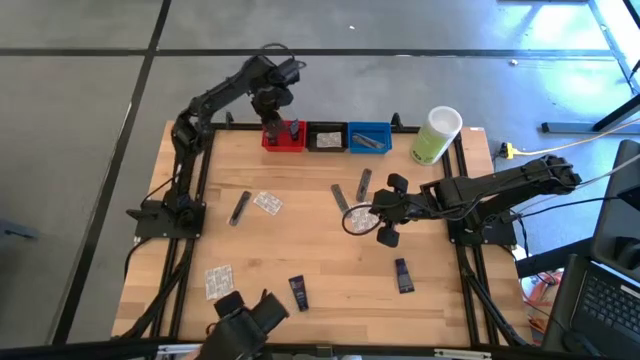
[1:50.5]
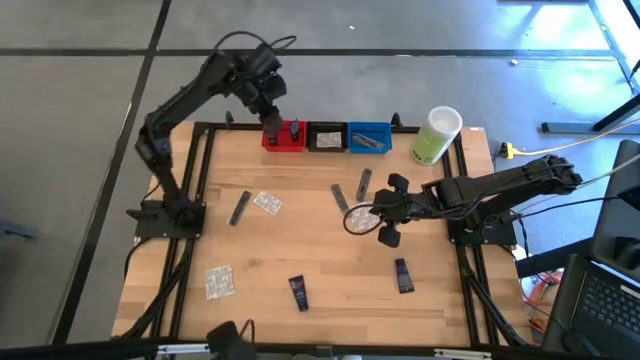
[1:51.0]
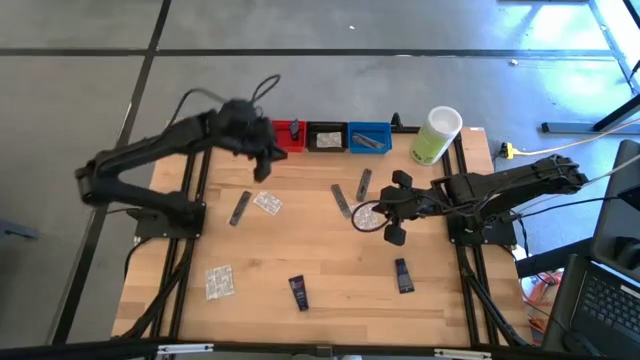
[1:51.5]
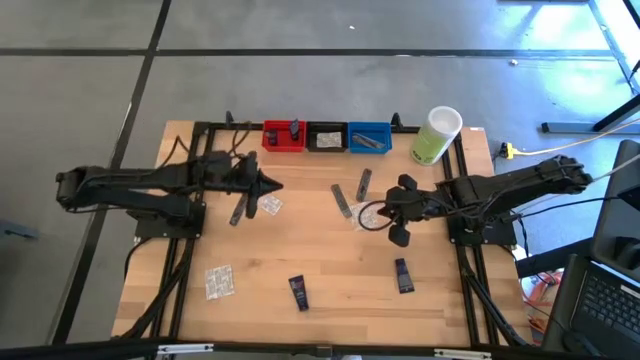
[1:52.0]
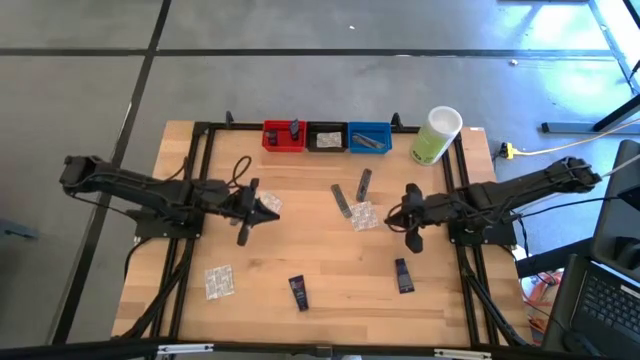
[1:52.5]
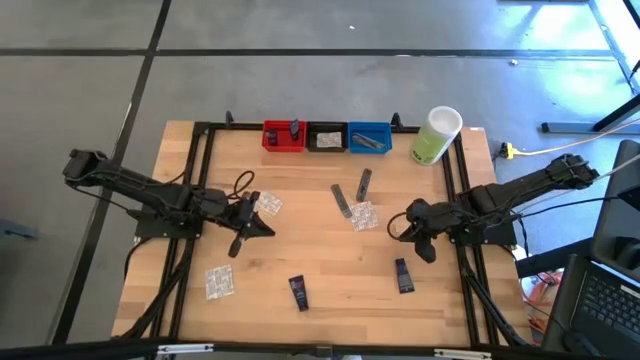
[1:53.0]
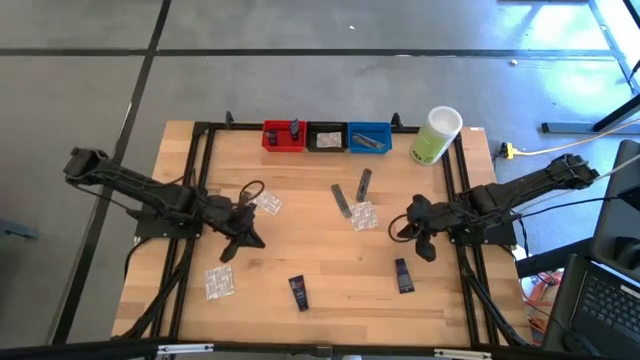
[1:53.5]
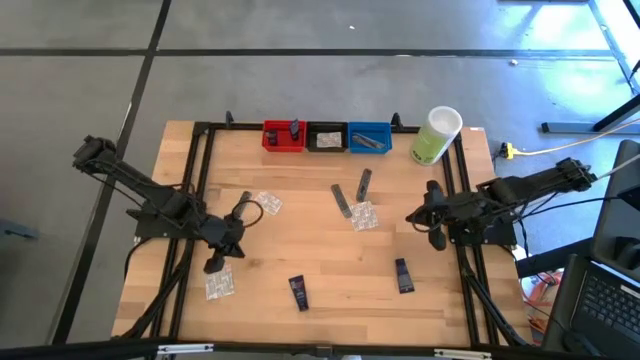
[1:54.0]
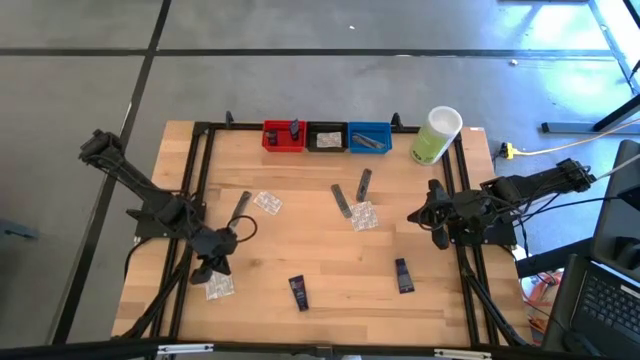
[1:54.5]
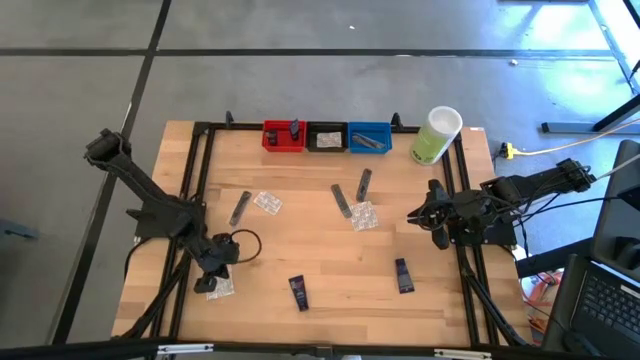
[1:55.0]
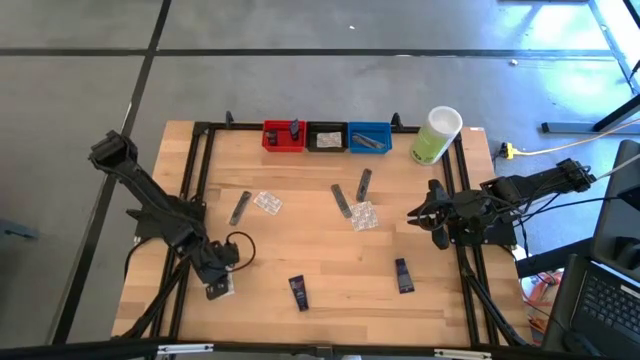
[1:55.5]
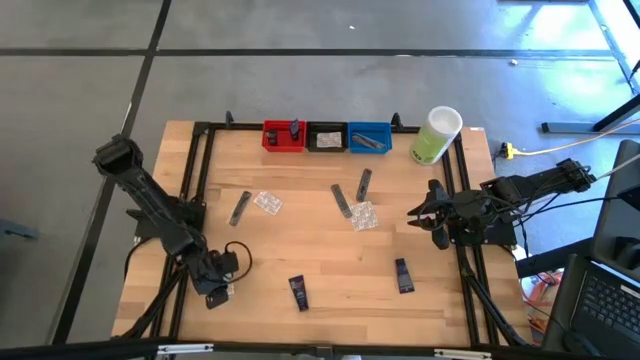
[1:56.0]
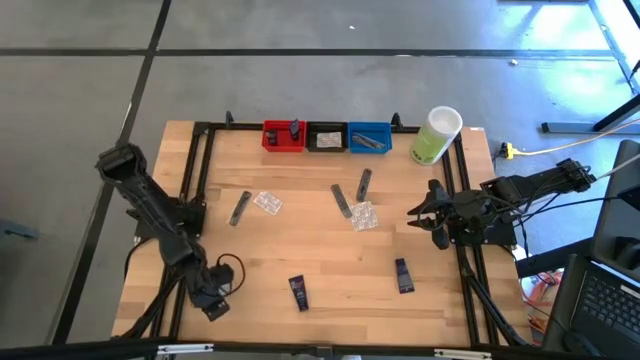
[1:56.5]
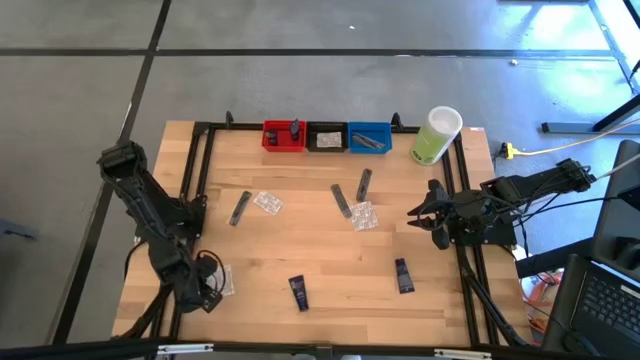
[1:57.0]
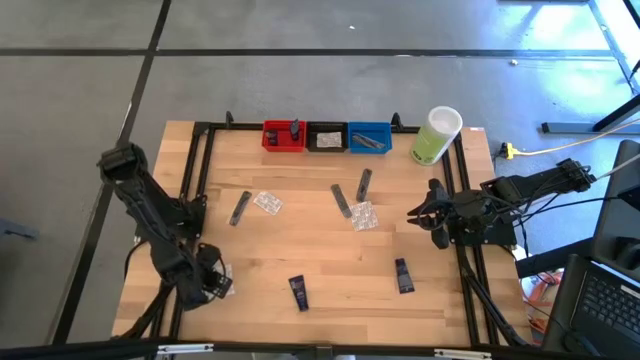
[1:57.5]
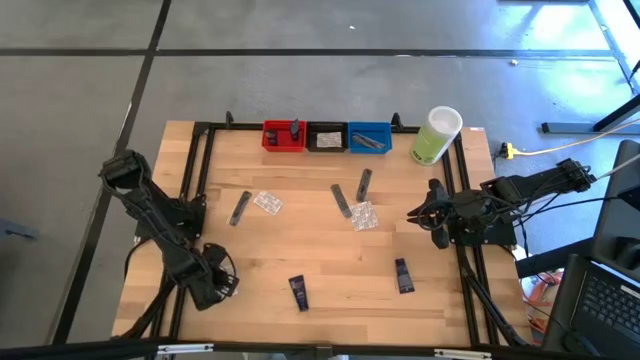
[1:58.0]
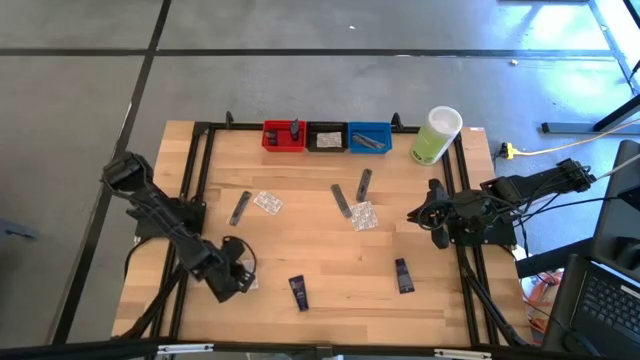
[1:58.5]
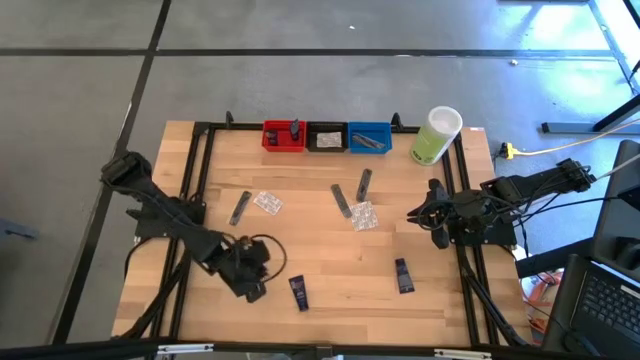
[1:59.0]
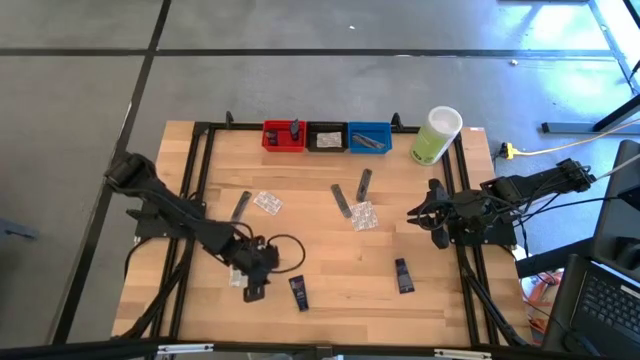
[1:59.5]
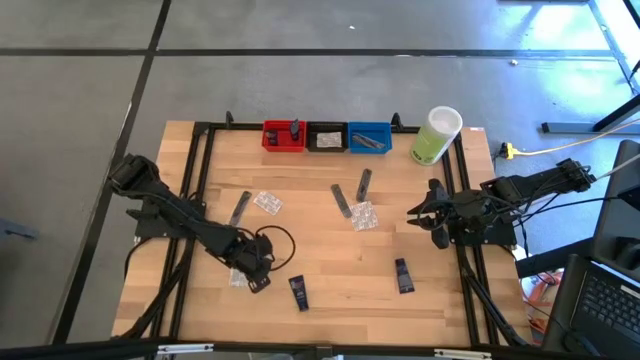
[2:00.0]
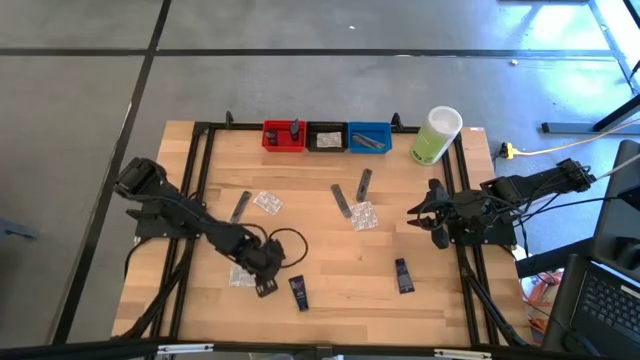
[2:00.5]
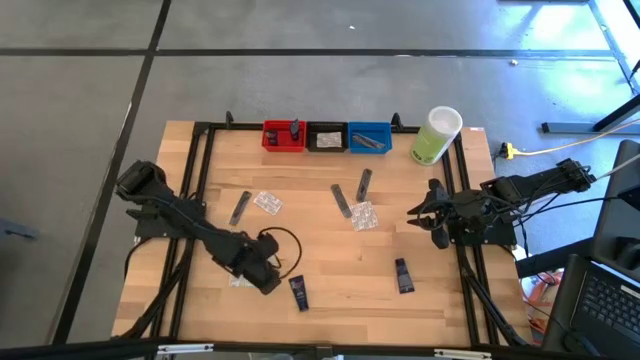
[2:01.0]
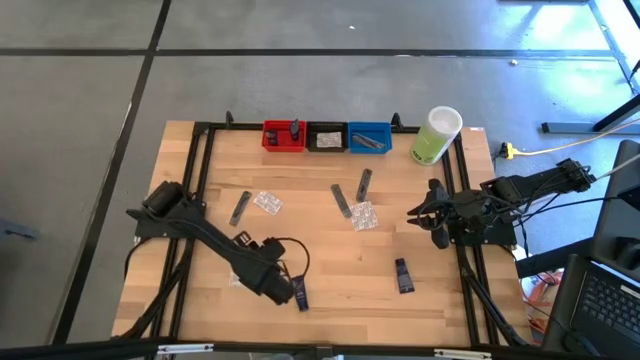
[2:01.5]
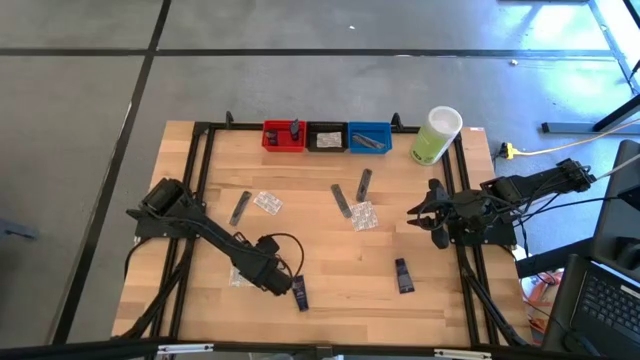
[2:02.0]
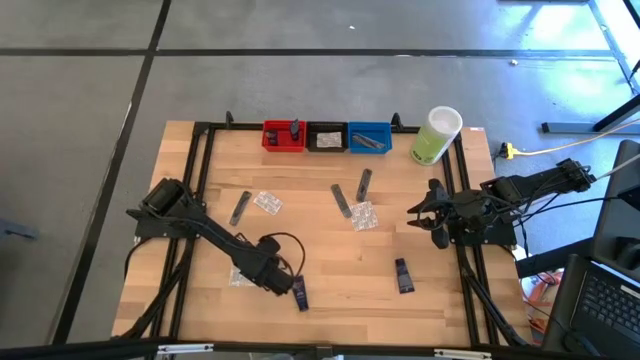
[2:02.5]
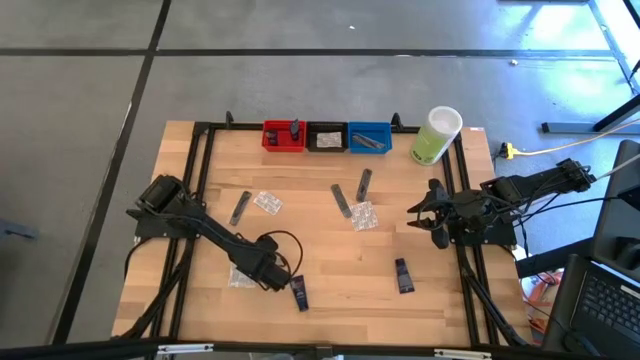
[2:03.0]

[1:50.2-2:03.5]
Task: Pick & Place Travel size toiletries
Put the white bandage pack into the black bin

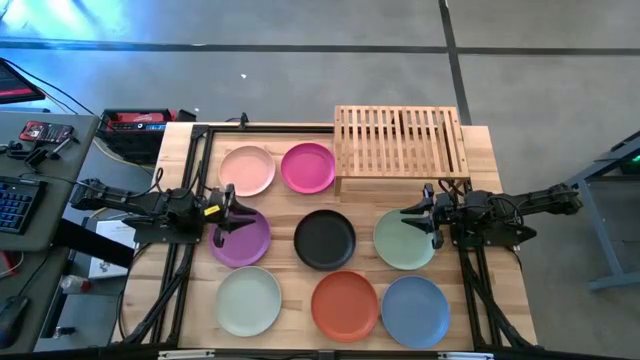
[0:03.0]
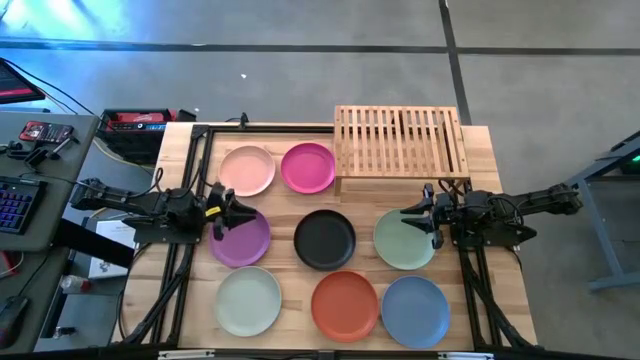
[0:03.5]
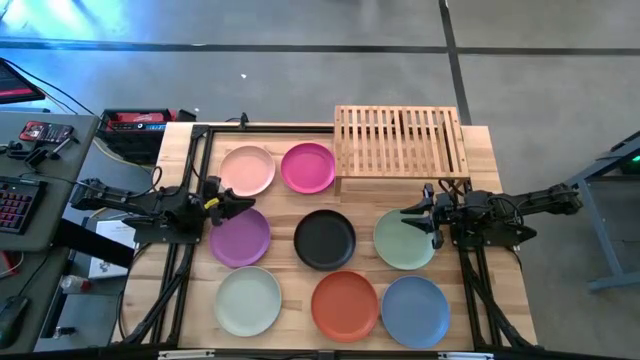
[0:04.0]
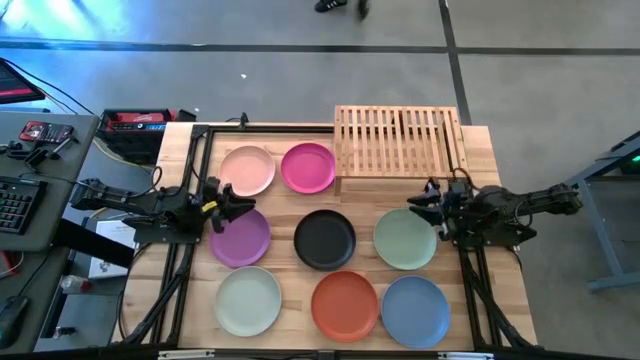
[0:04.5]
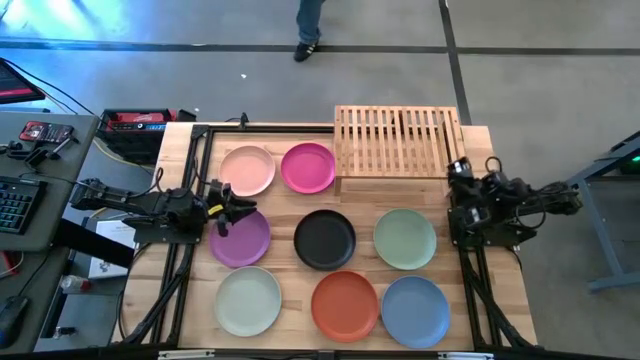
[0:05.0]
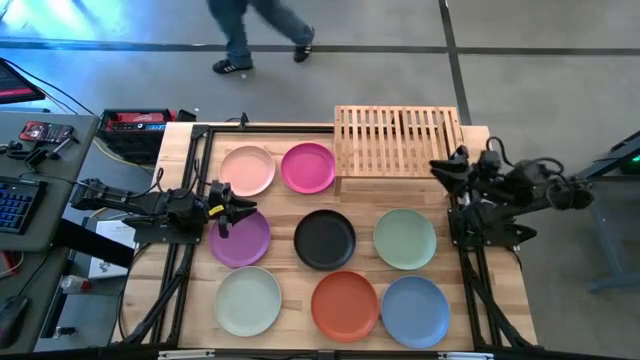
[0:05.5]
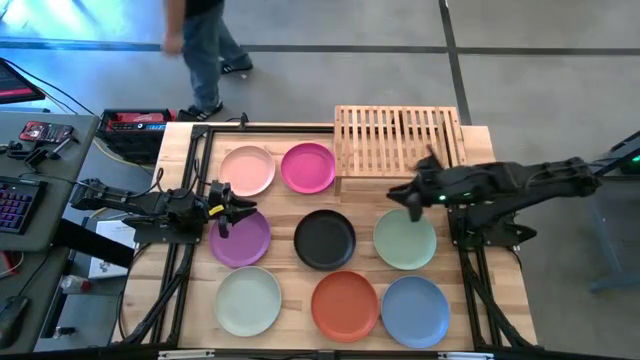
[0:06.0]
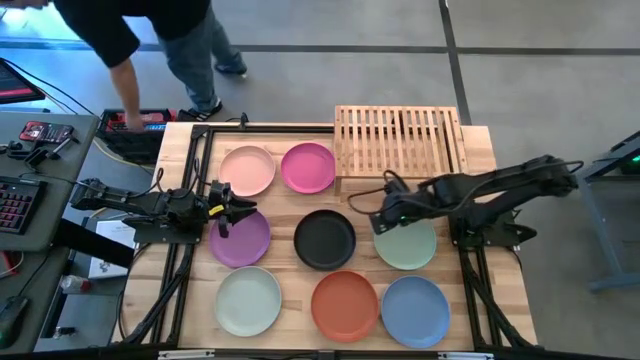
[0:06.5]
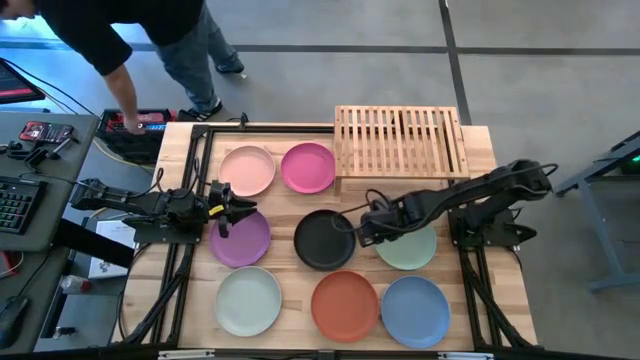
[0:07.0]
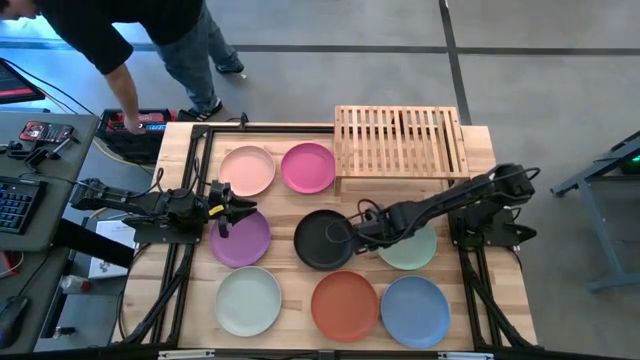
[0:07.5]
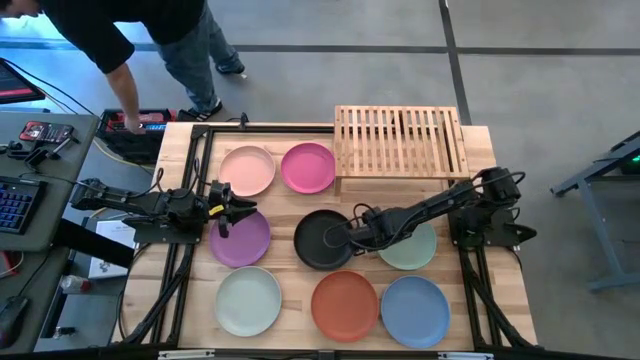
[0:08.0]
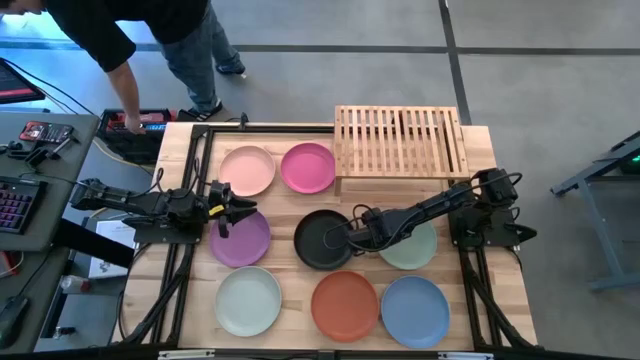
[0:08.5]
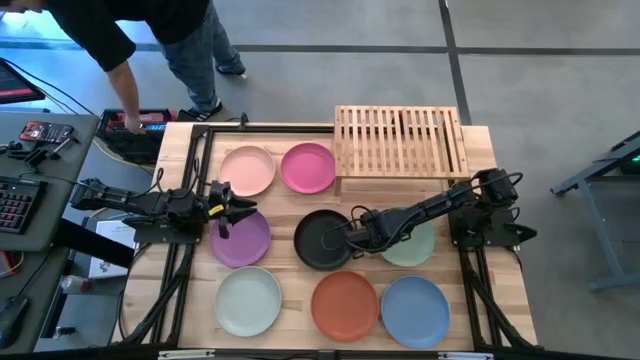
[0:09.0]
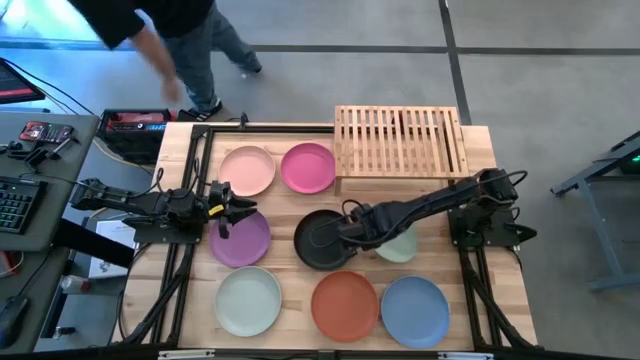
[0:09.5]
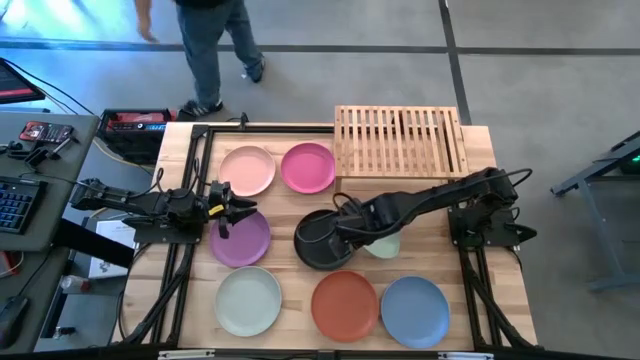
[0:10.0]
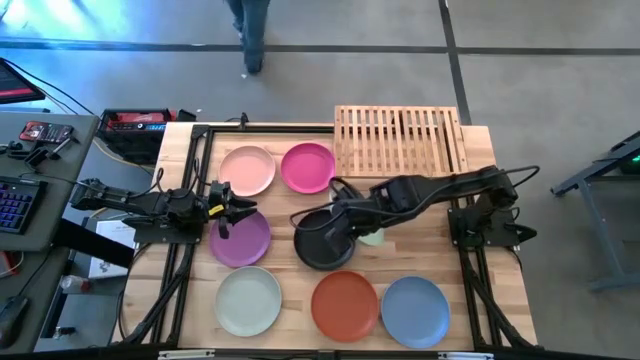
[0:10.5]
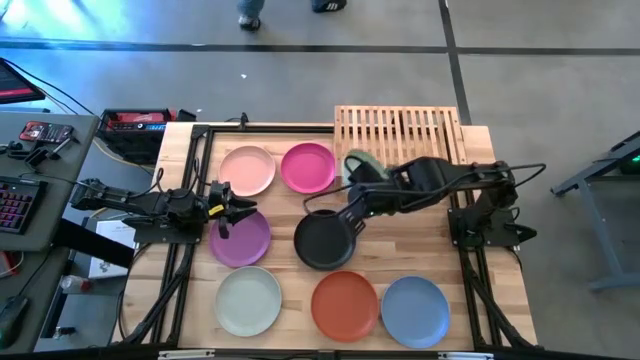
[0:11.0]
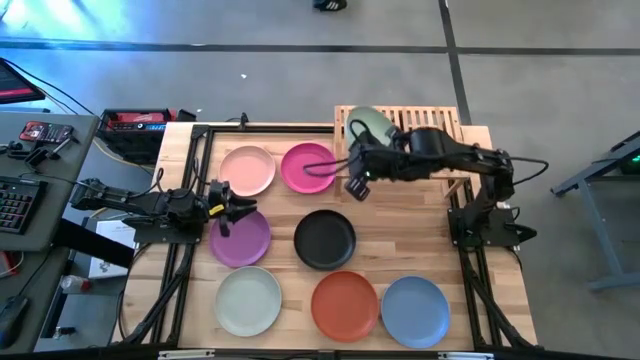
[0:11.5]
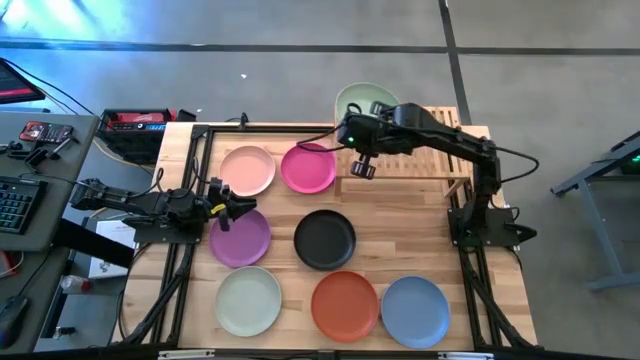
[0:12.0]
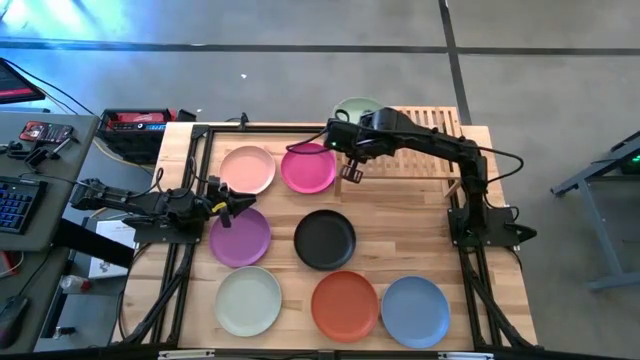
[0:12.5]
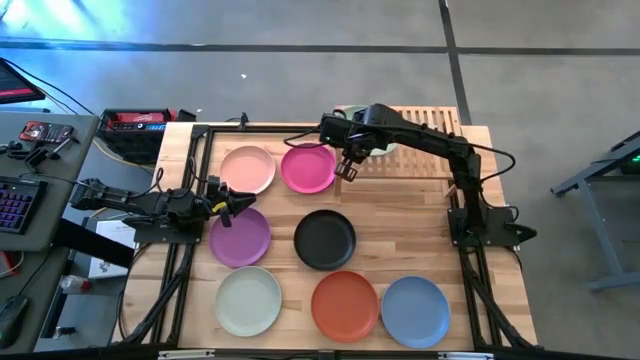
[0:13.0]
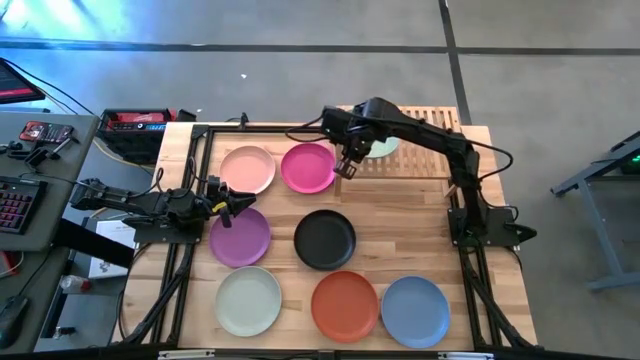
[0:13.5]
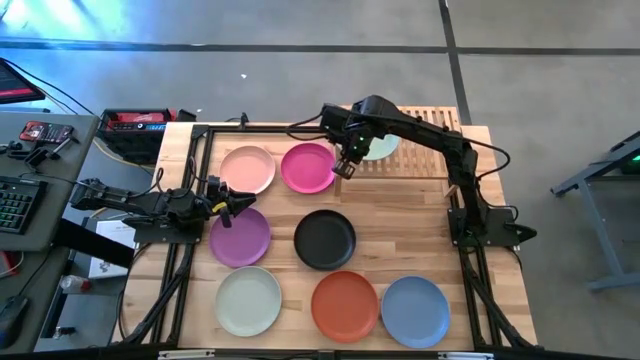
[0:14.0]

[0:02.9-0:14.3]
Task: Place and stack plates onto a shelf
Put the middle right green plate on the shelf
